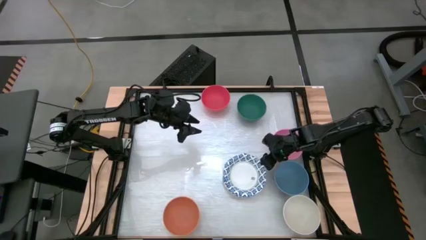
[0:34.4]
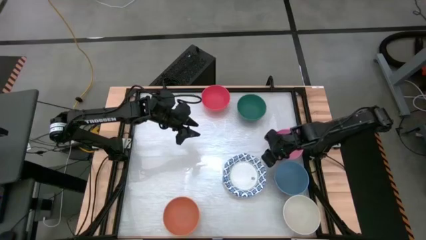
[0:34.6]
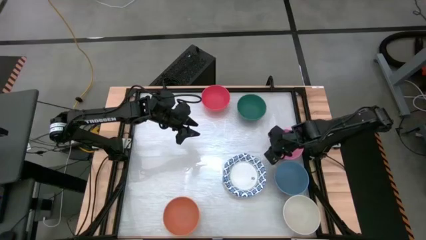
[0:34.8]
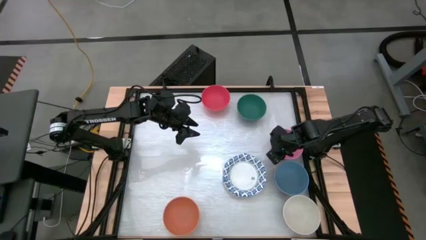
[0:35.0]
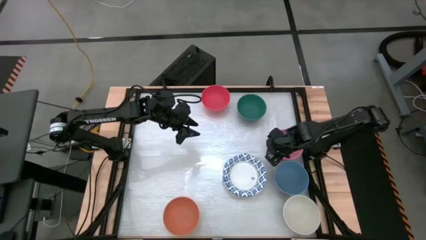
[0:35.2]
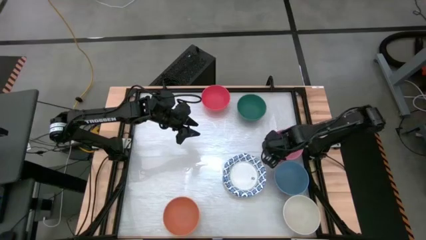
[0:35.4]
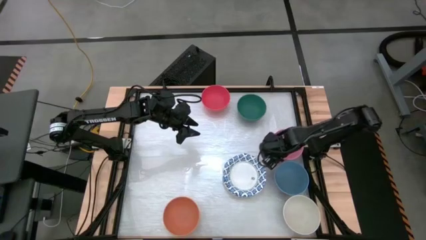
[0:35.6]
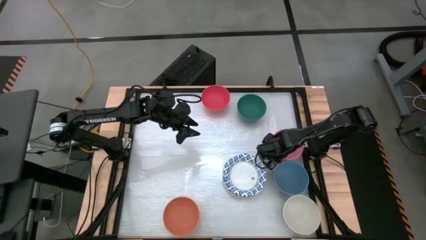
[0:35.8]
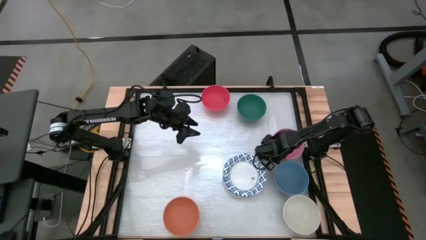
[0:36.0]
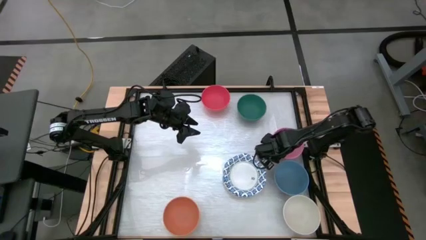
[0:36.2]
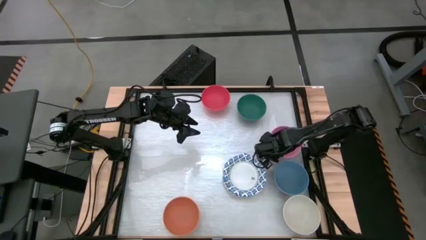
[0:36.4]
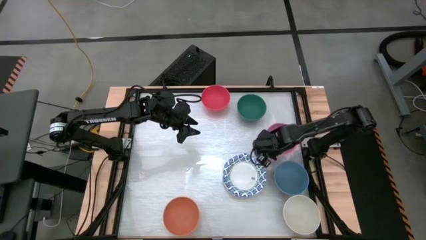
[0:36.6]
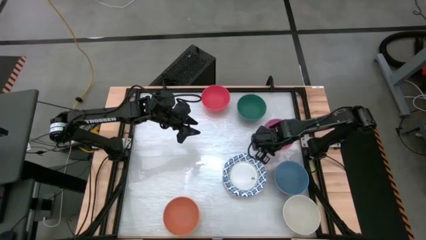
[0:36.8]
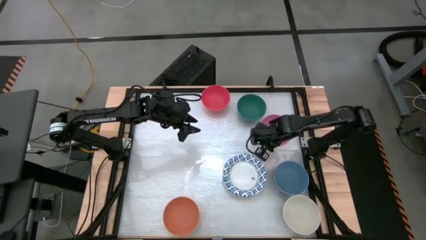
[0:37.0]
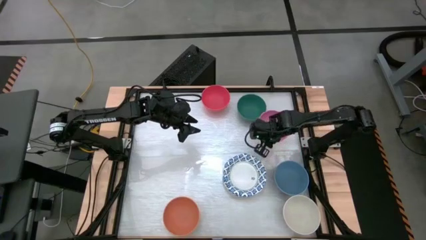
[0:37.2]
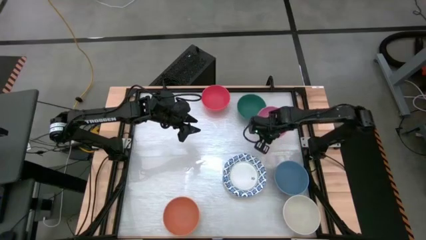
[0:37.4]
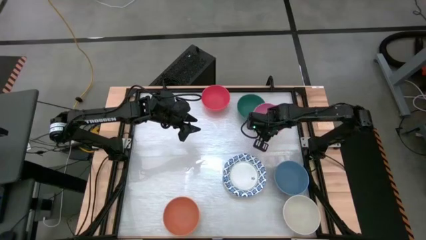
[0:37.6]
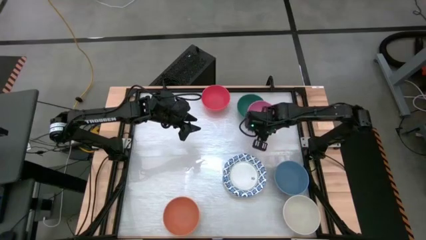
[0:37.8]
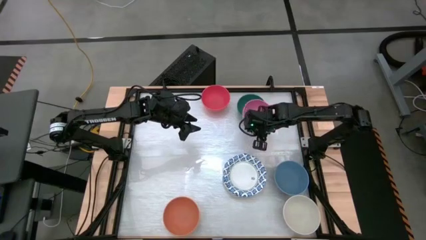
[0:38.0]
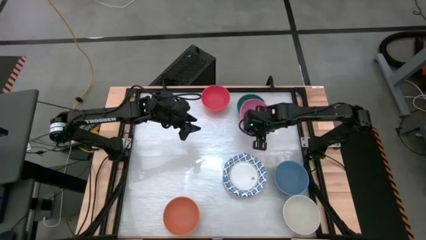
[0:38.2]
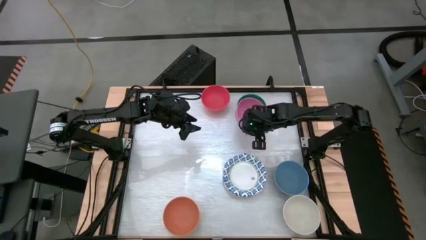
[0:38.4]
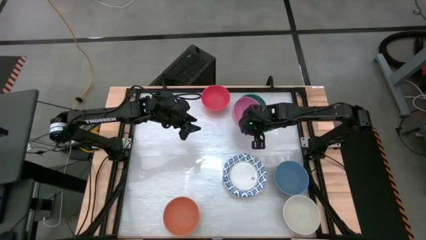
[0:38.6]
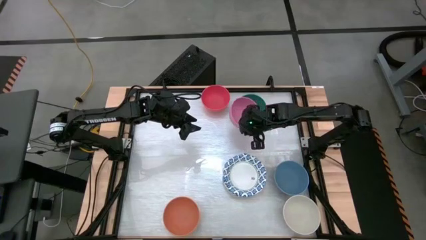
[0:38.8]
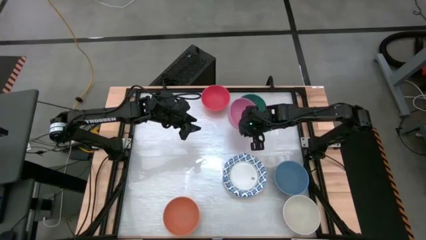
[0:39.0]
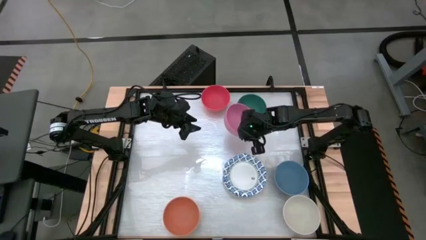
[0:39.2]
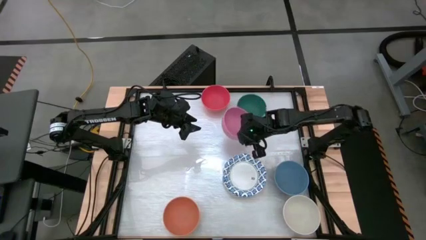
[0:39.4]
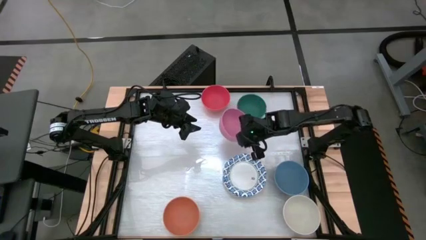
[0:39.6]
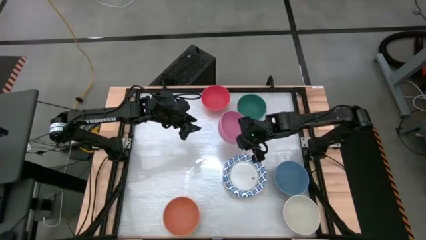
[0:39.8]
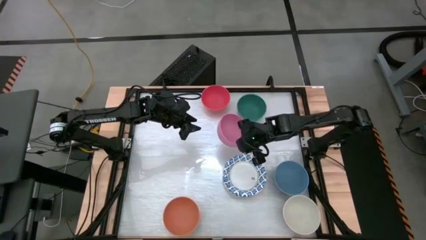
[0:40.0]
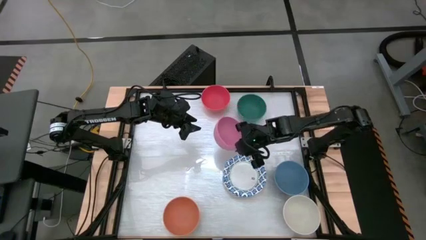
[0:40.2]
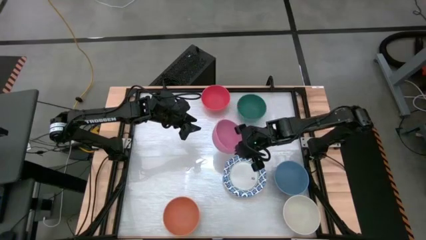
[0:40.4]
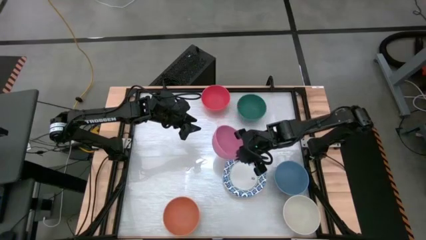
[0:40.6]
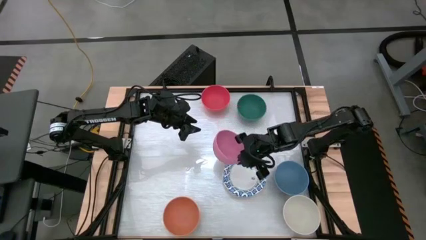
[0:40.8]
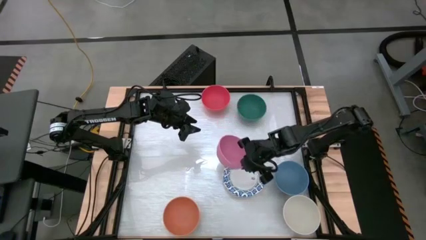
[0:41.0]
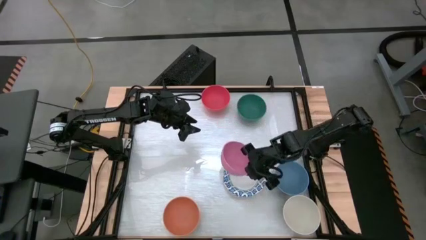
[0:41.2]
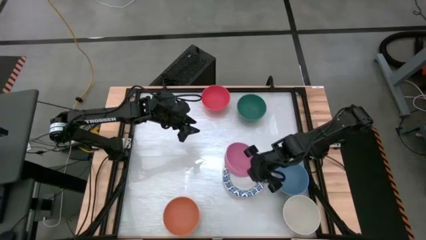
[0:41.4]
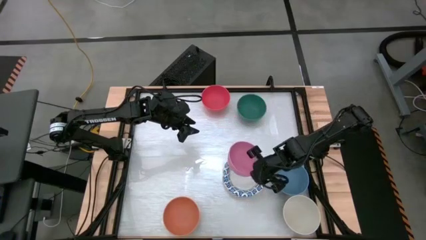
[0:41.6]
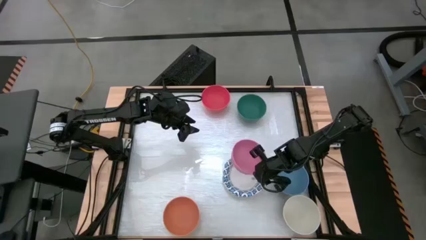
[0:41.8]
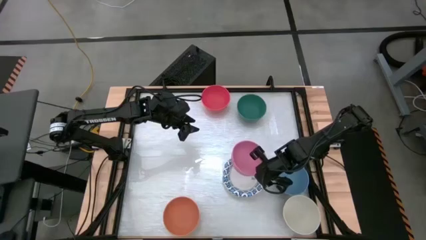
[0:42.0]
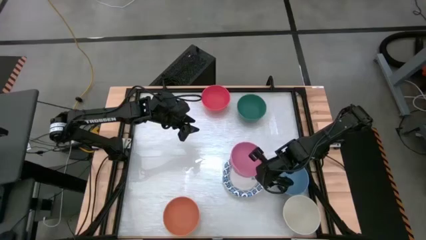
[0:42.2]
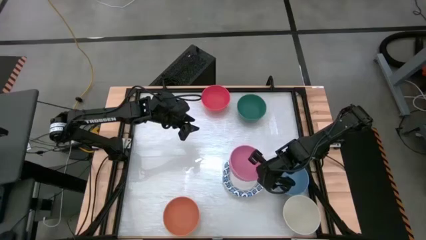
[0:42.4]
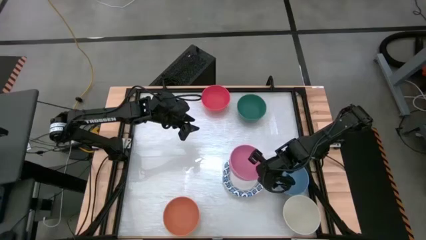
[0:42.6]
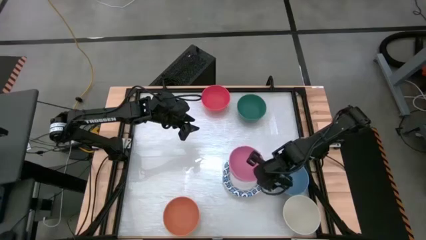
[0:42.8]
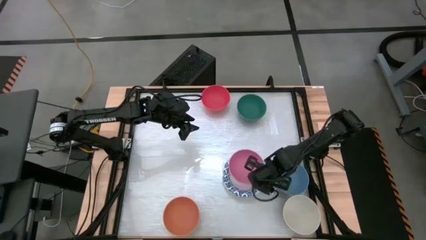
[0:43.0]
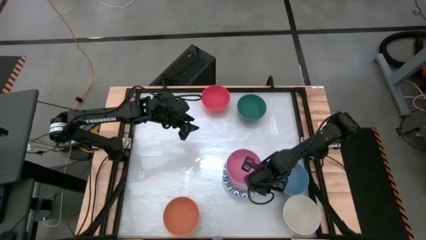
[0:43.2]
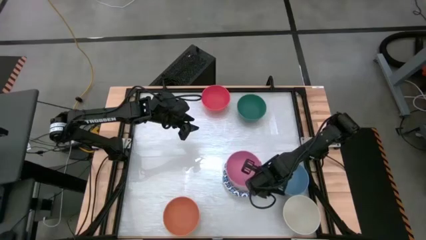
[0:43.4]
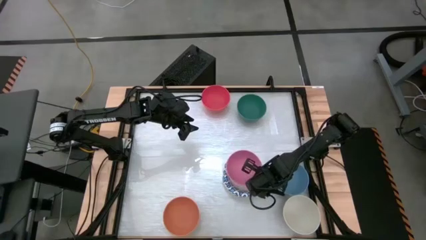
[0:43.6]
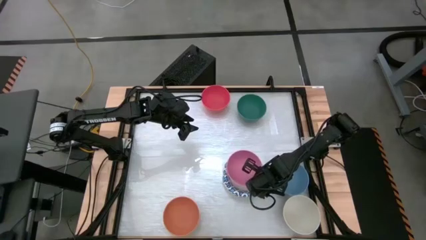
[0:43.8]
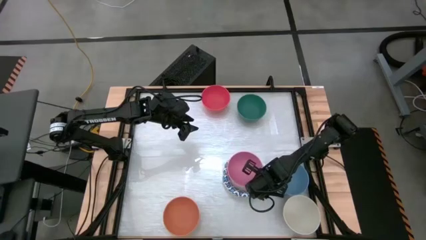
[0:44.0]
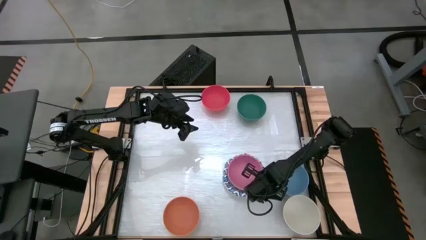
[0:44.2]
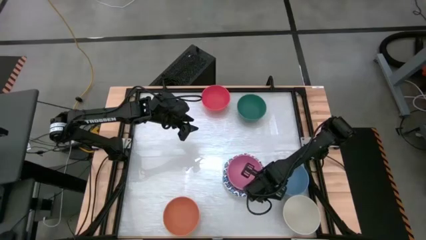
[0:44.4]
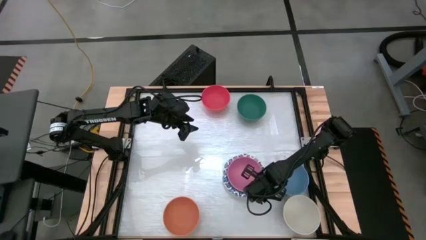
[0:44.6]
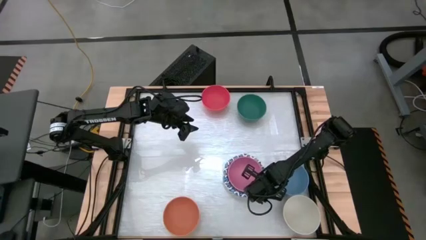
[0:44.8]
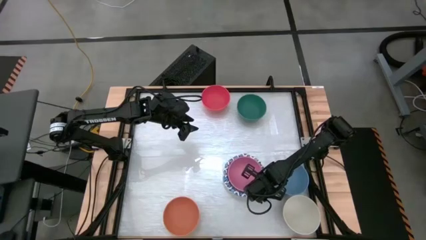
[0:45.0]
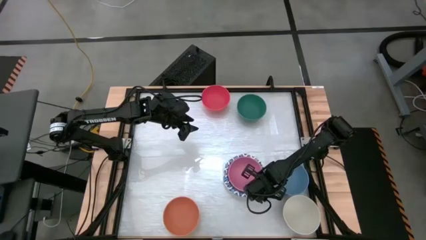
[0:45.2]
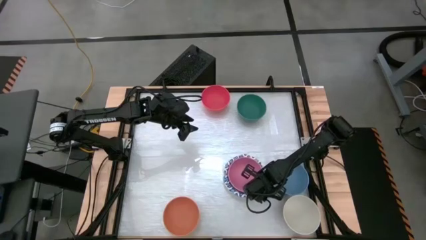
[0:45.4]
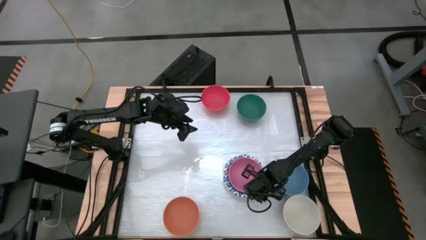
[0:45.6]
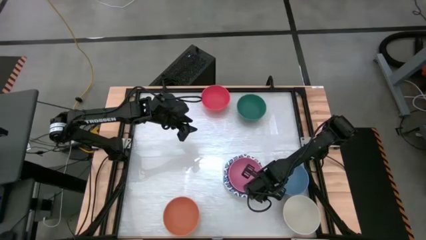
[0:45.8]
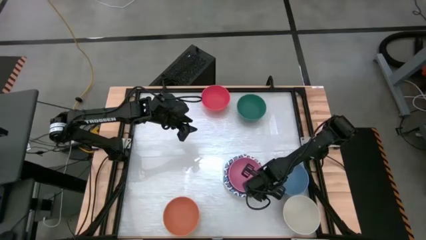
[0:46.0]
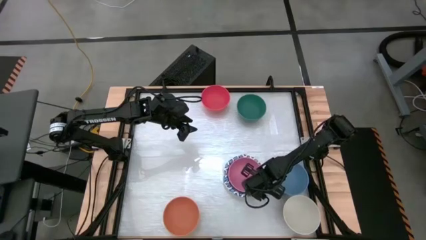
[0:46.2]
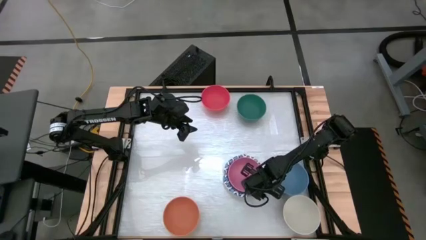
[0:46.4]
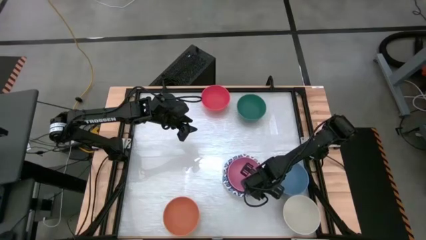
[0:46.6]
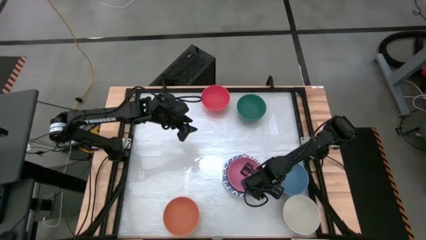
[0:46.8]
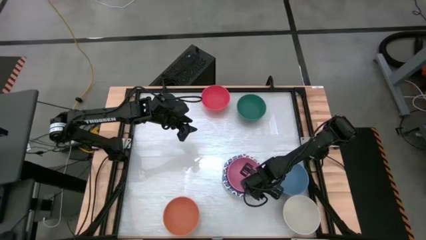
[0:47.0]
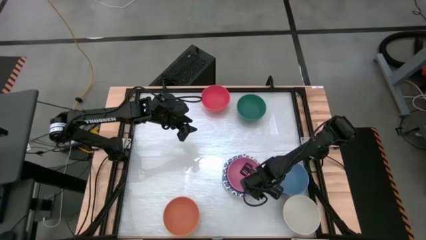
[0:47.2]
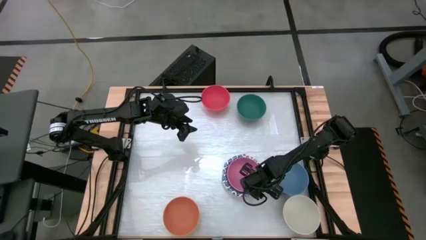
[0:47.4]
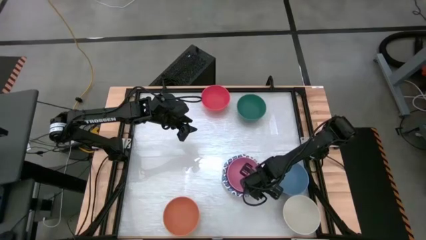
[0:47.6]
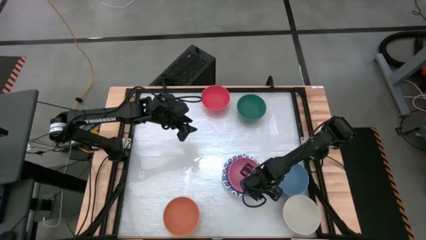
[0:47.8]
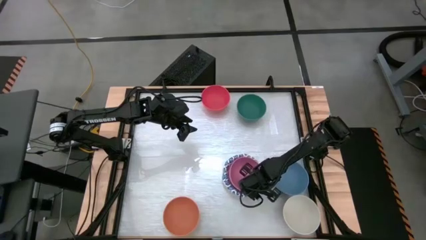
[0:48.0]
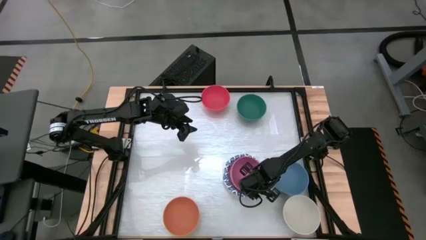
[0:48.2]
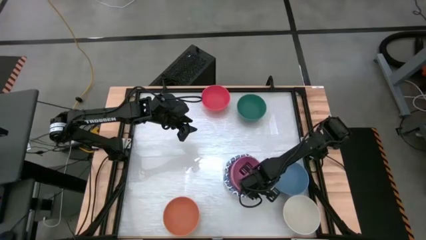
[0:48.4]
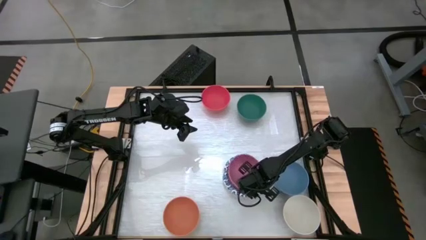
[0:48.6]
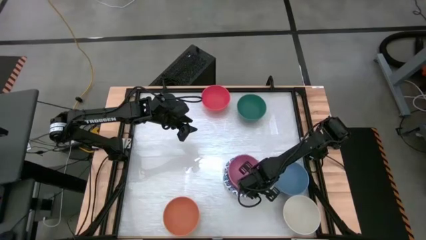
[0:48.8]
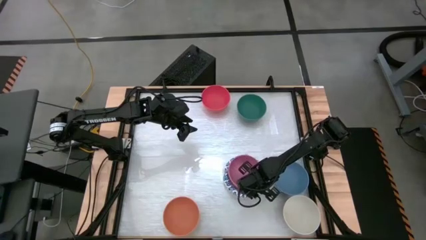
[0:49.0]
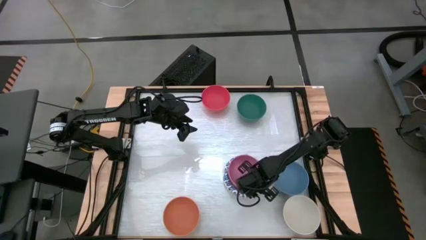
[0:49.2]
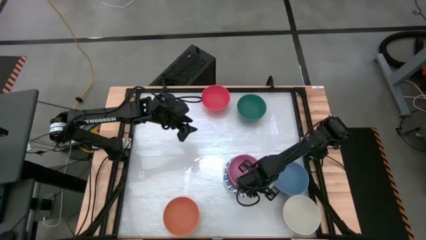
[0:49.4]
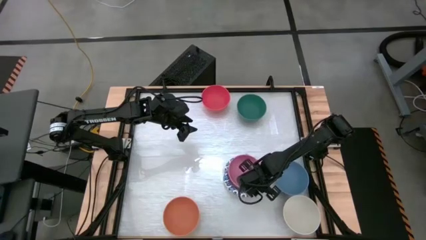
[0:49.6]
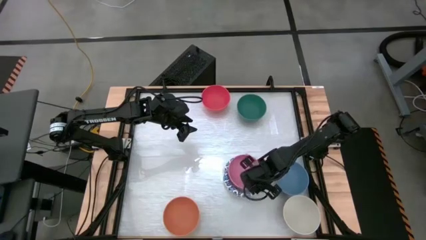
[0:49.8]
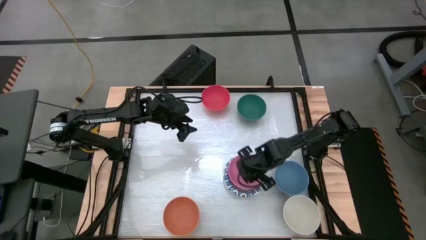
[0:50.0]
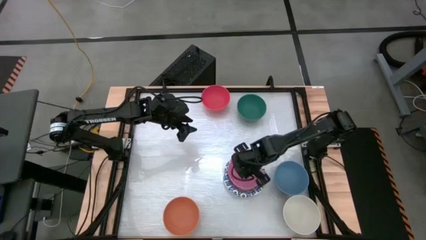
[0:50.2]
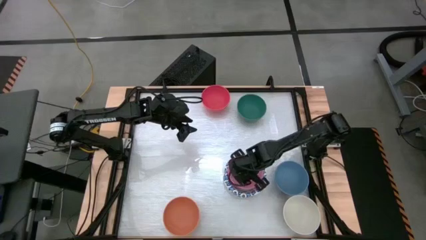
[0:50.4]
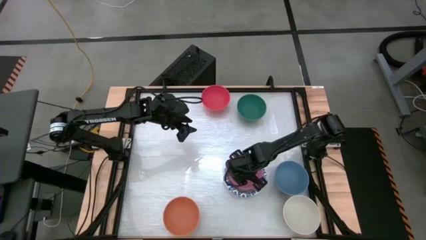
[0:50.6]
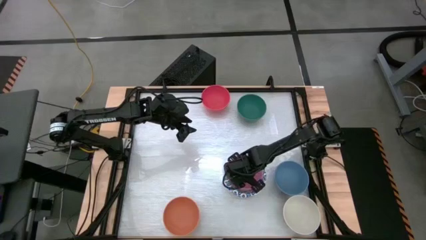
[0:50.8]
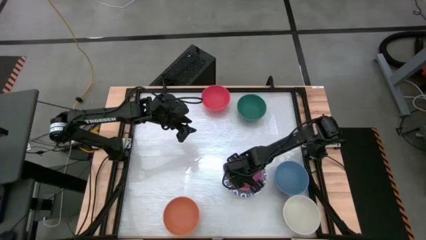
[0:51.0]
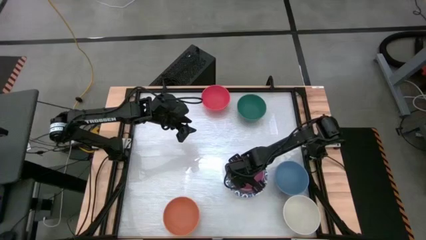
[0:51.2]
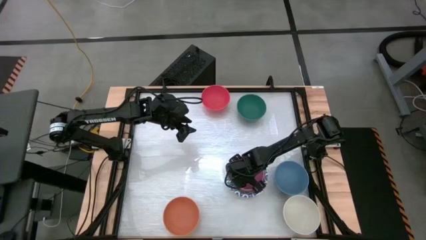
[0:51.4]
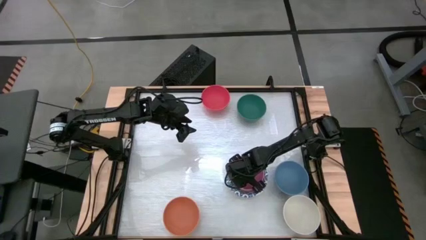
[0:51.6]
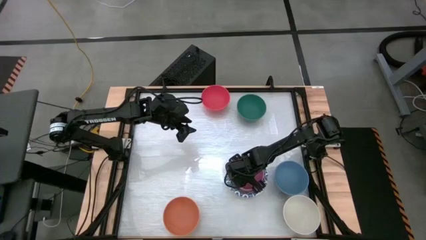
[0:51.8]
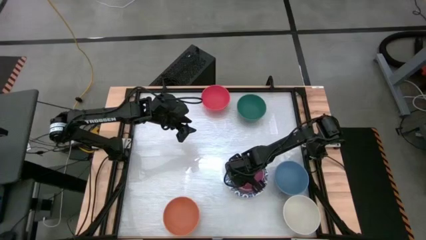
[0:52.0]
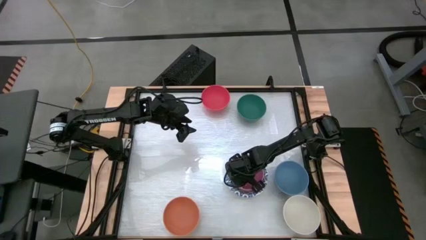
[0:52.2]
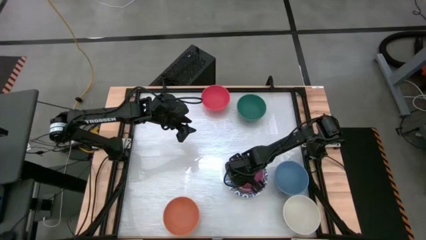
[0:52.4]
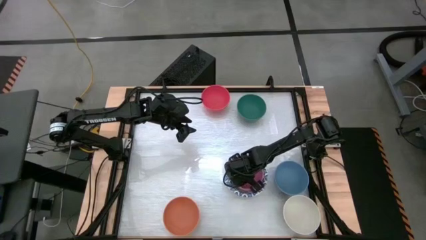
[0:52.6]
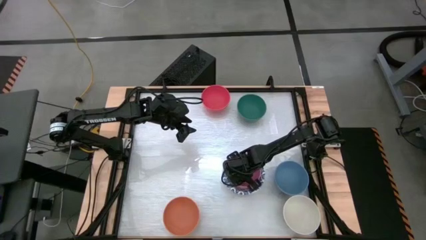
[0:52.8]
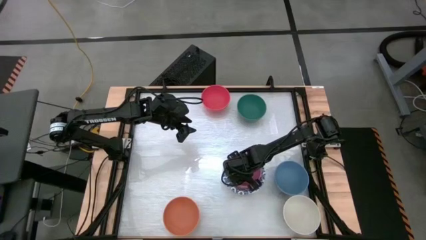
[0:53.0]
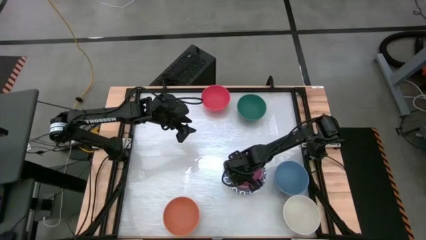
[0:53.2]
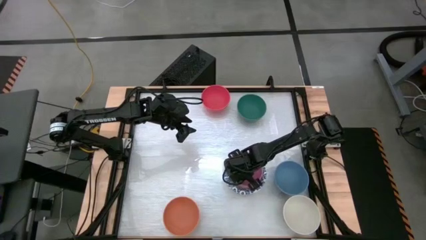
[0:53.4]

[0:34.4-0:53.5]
Task: Nest bowls inside each other by size order
Stack the pink bowl into the blue patterned bowl
